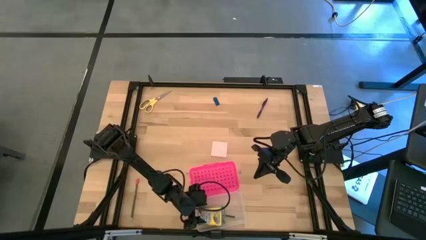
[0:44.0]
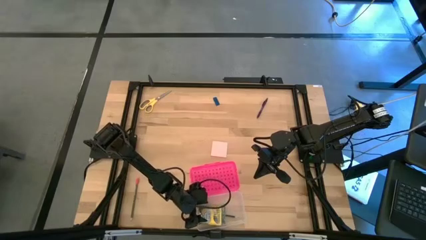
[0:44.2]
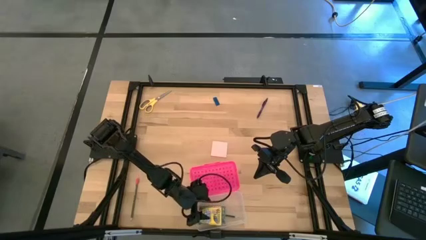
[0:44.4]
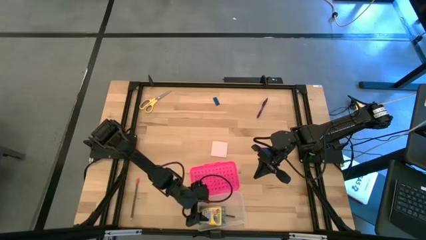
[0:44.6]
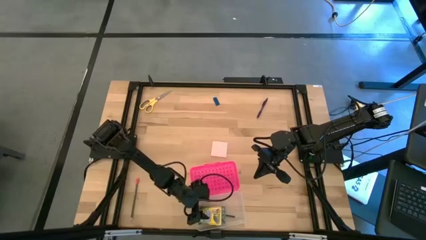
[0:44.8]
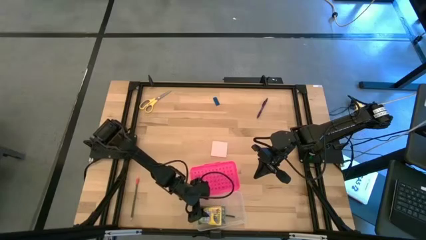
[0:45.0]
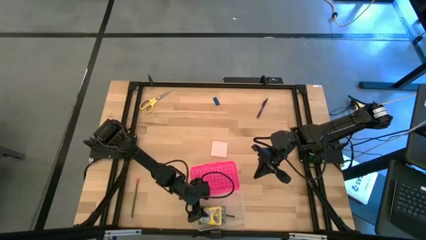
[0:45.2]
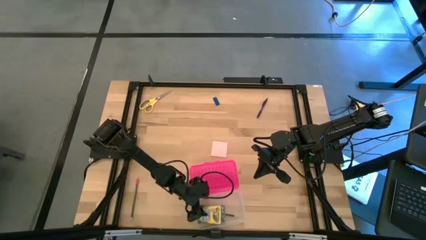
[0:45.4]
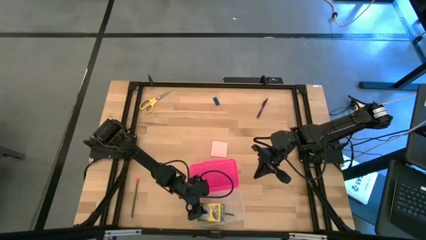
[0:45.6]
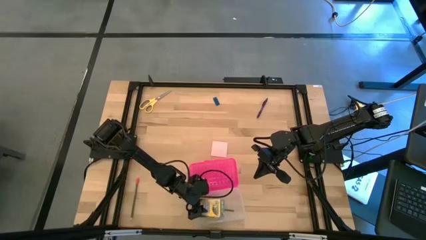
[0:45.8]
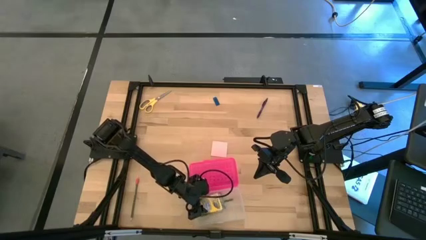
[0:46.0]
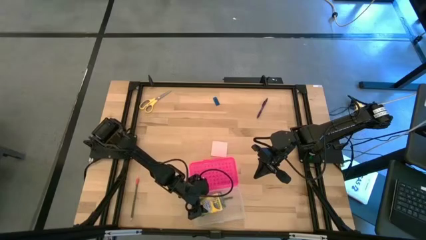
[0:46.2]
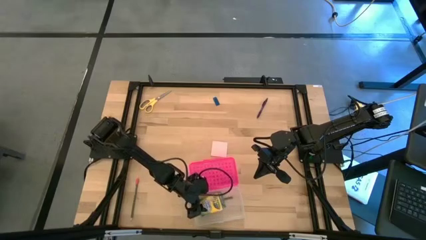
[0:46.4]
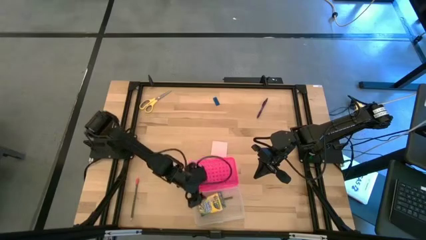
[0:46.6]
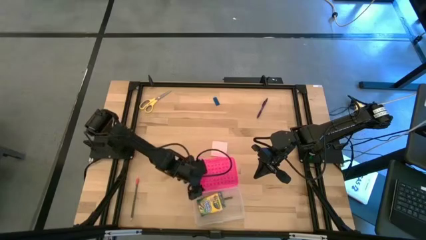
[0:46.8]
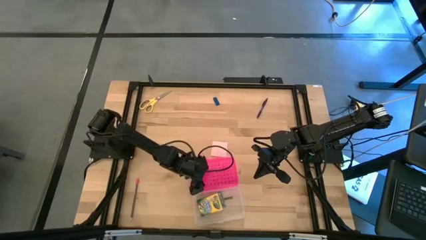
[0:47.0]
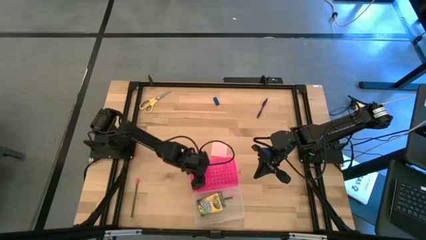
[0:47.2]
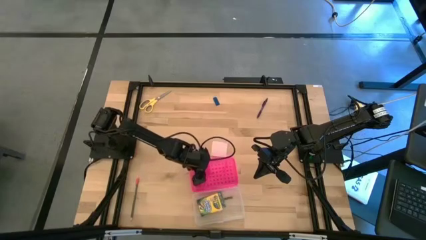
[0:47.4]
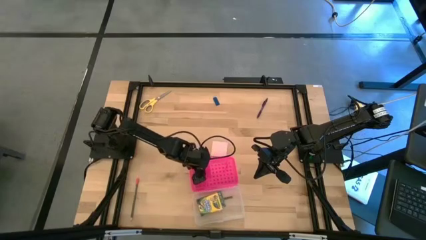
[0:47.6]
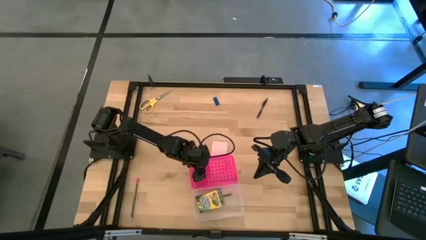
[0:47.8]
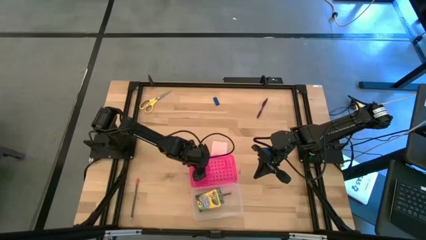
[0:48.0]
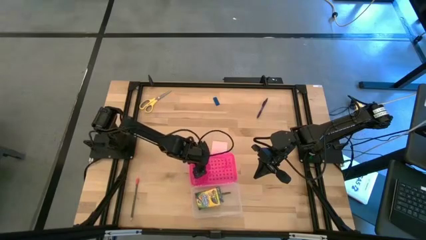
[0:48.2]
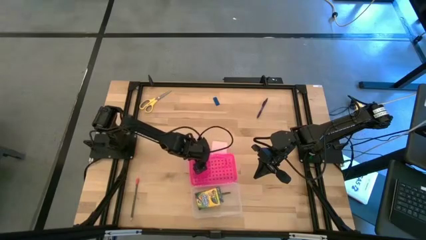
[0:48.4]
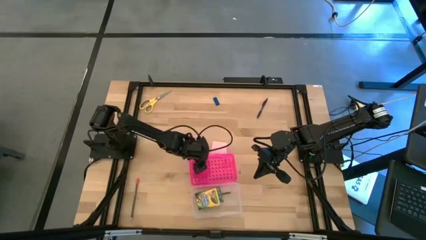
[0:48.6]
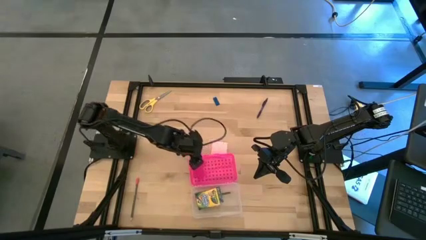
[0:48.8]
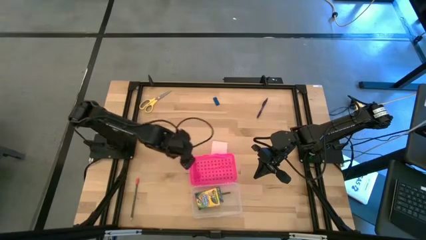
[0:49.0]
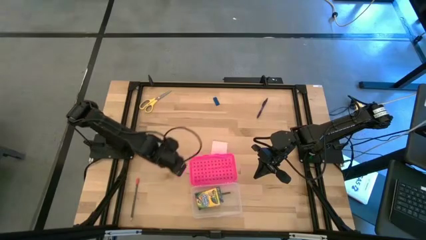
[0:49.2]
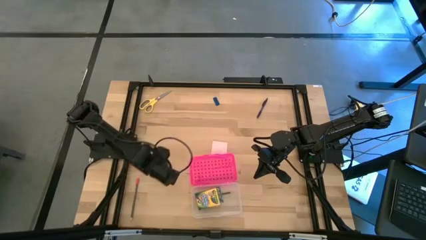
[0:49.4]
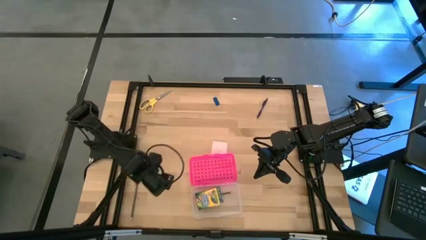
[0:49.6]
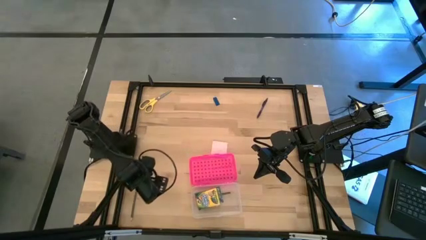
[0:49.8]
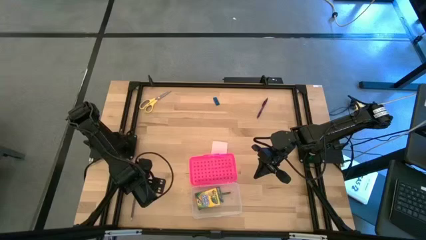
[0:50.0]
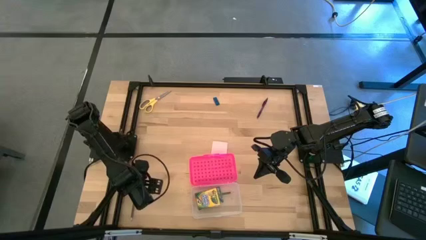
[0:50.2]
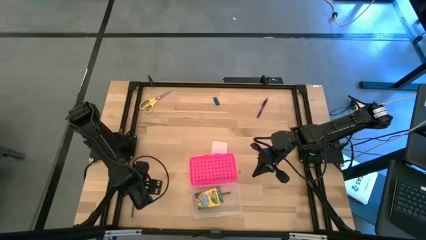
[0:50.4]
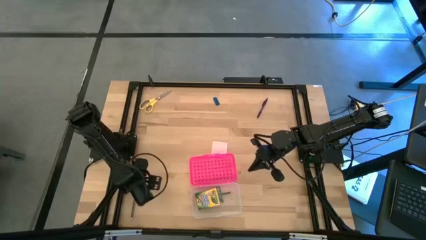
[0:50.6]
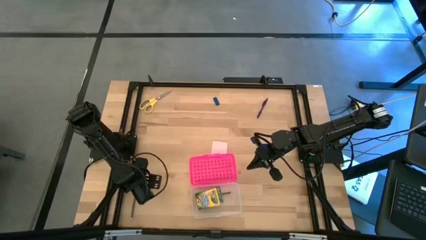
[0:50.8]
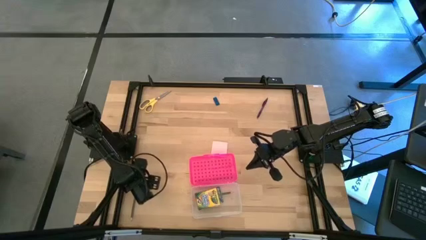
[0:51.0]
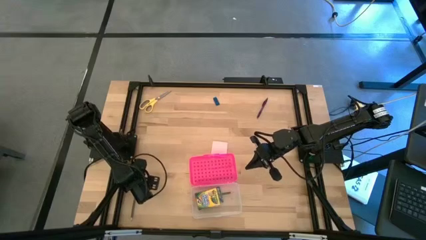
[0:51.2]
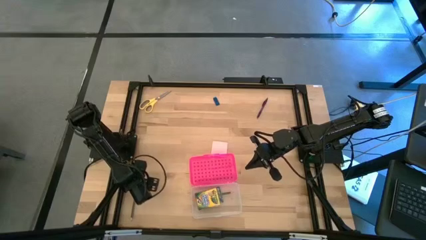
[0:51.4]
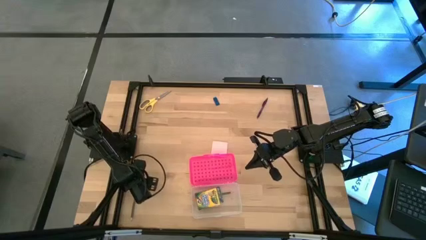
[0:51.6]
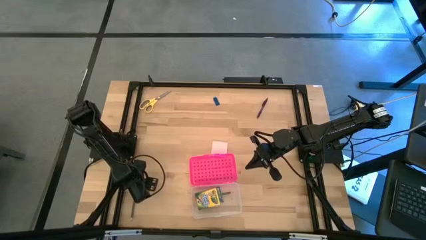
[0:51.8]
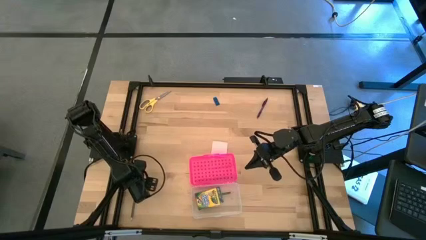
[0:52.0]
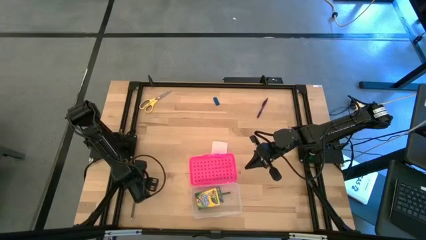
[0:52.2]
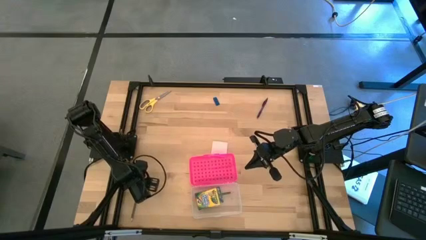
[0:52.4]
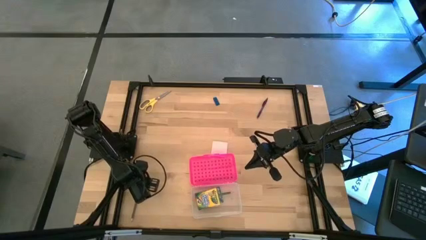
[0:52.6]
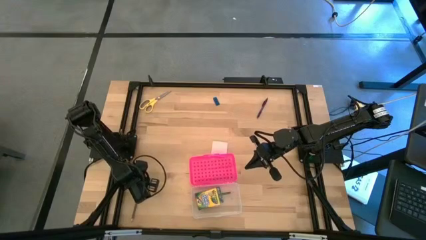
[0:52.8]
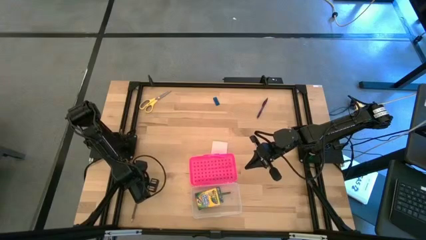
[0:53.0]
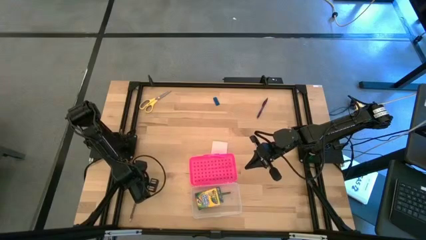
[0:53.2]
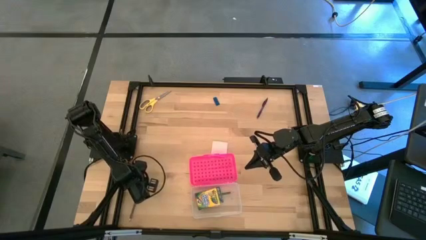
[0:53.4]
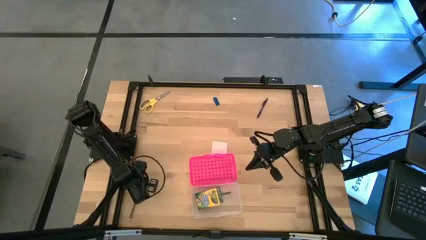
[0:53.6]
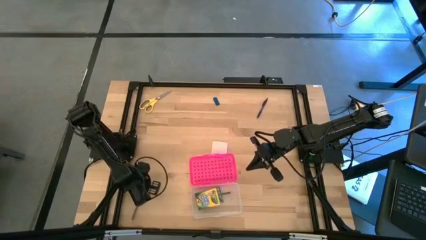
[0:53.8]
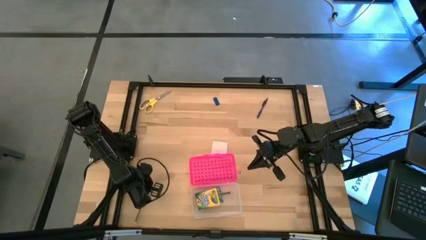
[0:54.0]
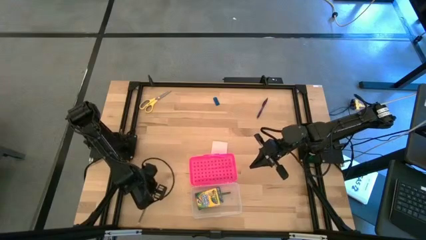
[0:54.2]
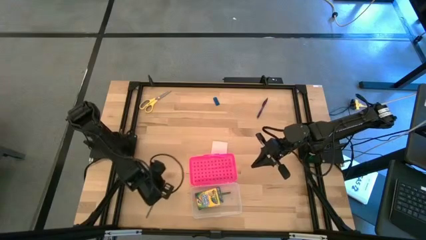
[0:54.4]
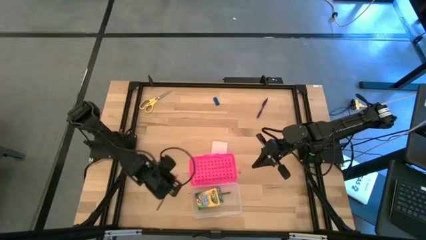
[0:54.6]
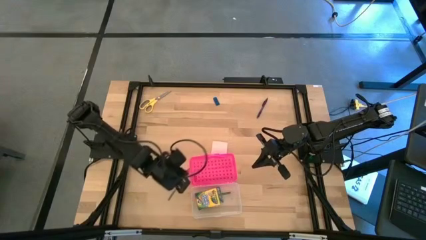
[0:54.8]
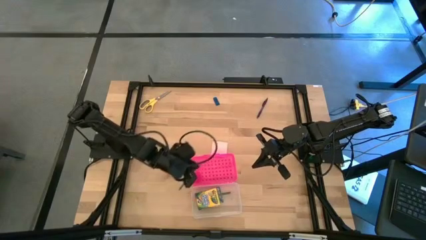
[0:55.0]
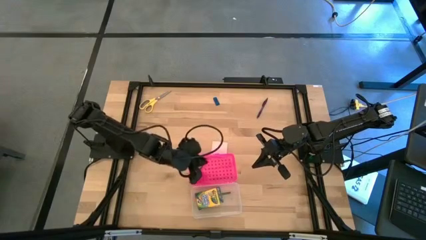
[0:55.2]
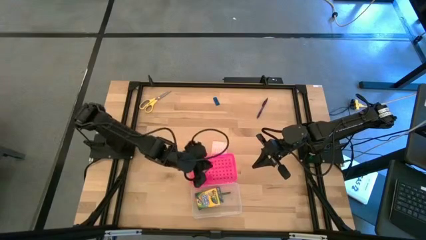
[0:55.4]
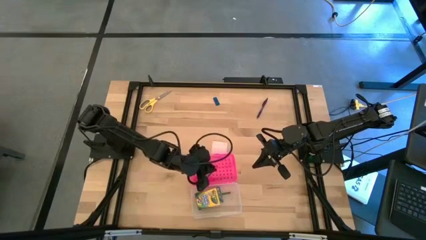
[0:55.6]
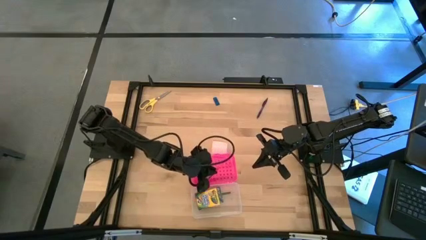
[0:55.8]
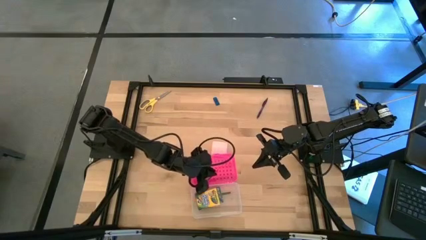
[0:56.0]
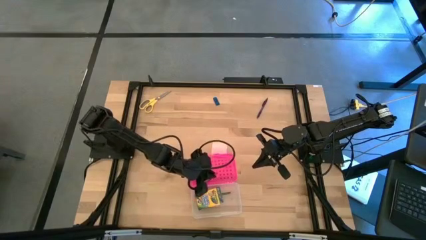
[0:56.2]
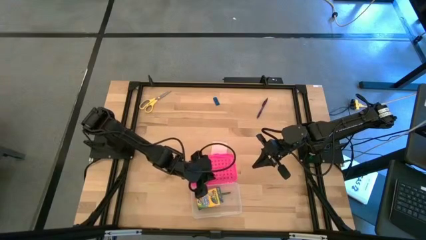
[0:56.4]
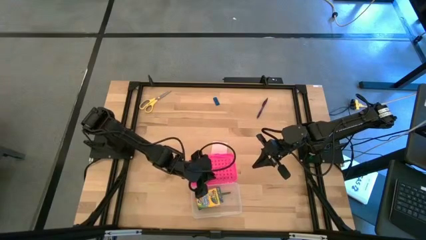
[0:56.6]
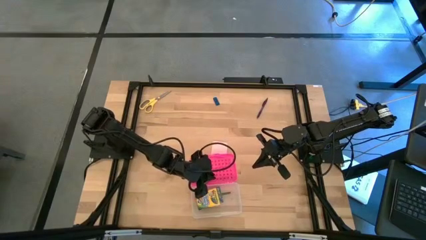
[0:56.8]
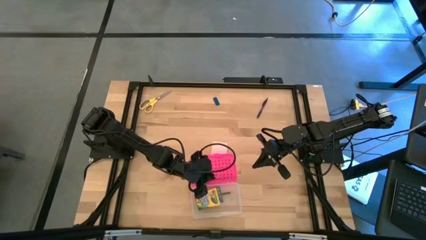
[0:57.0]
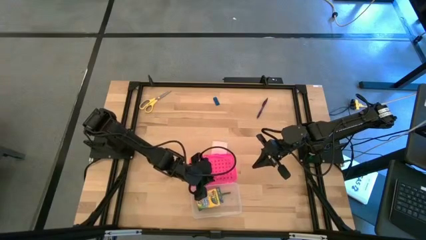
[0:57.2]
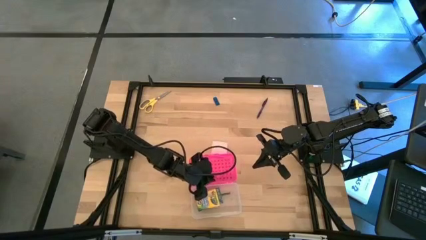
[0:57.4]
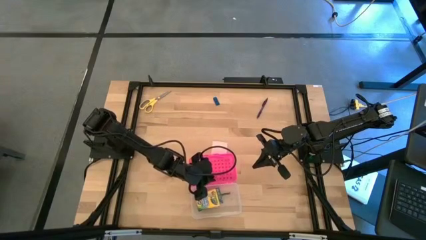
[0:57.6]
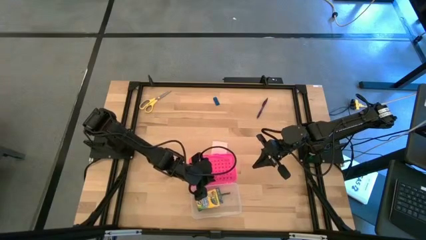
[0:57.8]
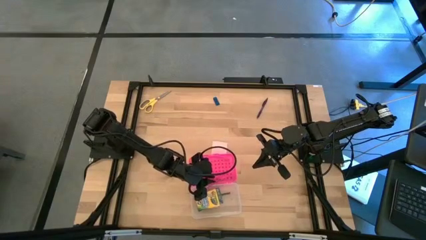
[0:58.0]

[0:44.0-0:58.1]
Task: Pack school essentials
Put the pink pencil into the pink supply box
